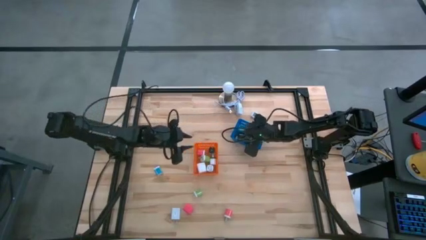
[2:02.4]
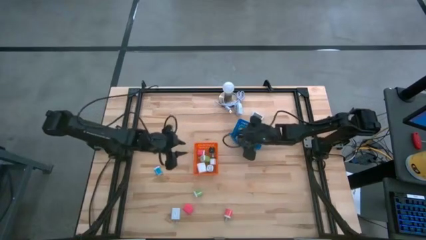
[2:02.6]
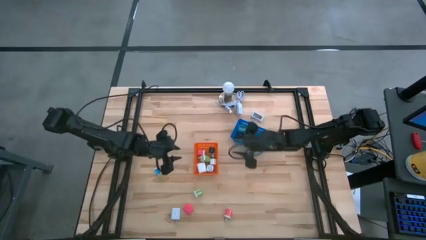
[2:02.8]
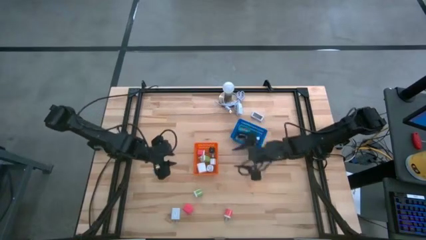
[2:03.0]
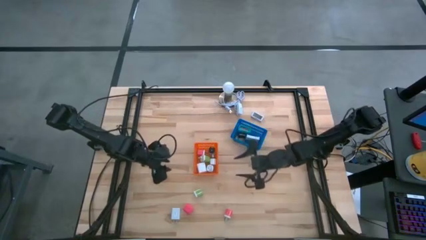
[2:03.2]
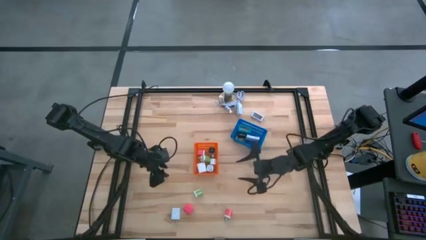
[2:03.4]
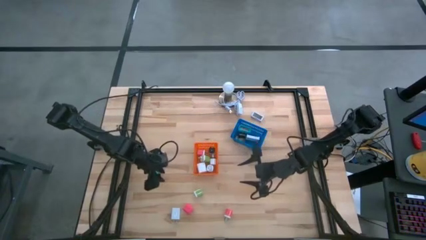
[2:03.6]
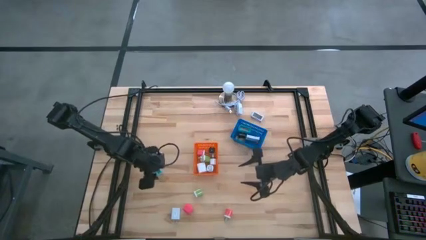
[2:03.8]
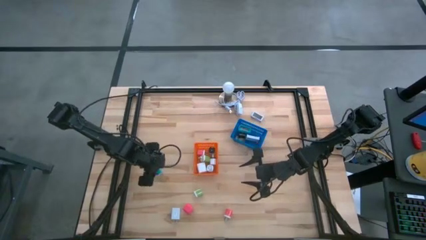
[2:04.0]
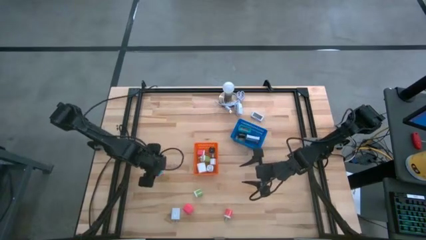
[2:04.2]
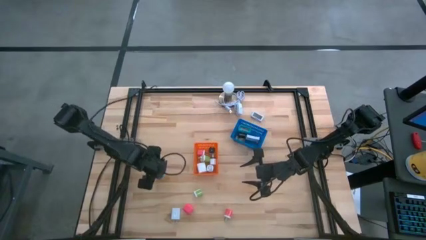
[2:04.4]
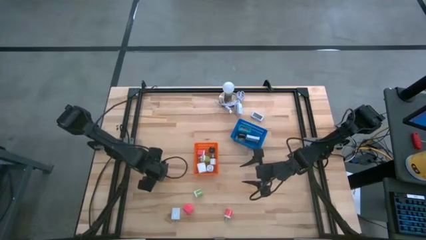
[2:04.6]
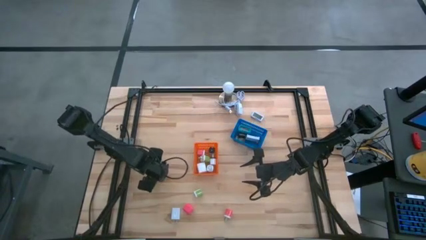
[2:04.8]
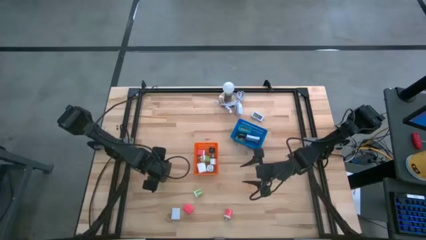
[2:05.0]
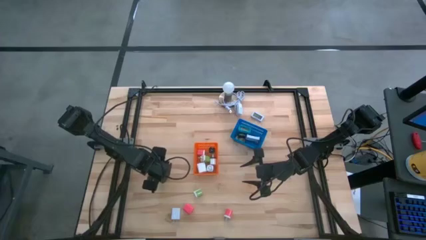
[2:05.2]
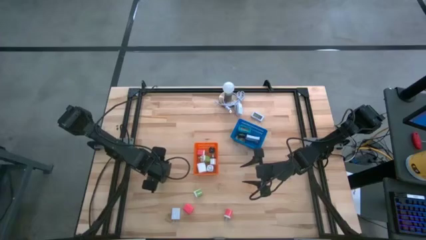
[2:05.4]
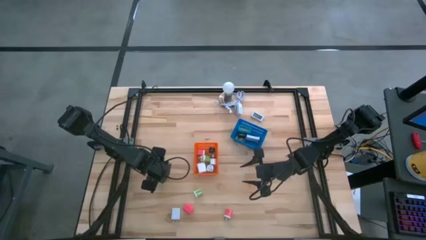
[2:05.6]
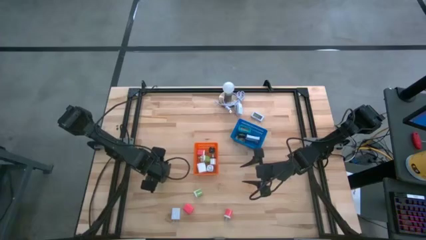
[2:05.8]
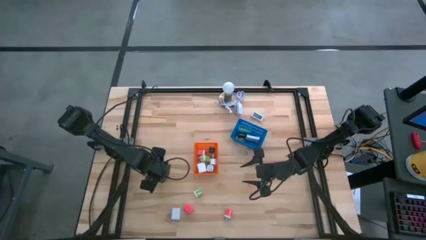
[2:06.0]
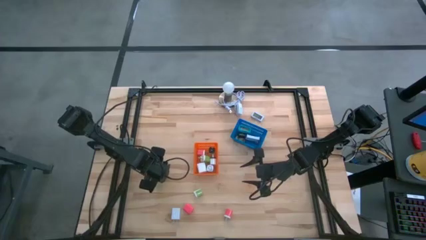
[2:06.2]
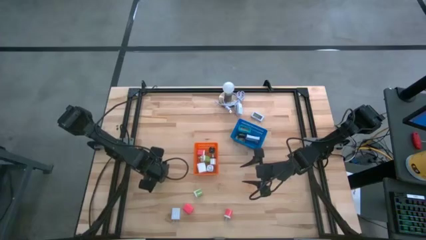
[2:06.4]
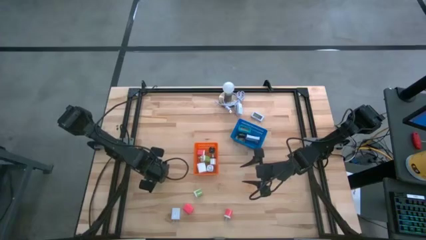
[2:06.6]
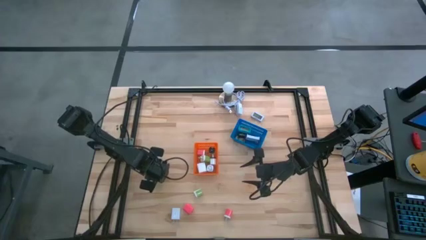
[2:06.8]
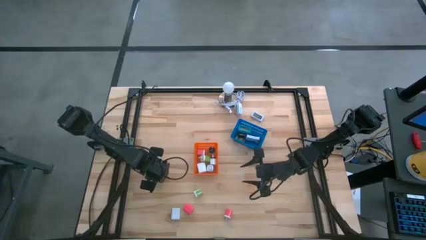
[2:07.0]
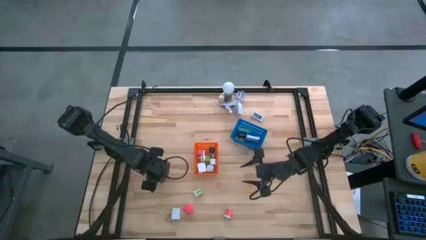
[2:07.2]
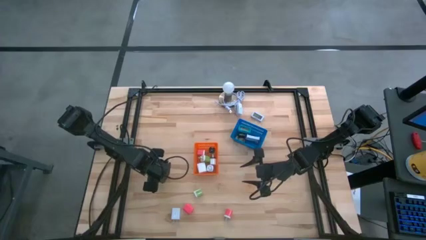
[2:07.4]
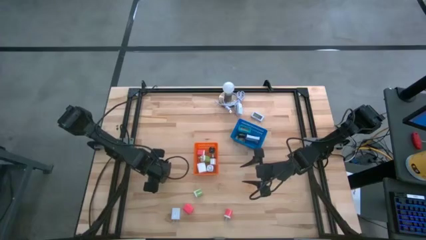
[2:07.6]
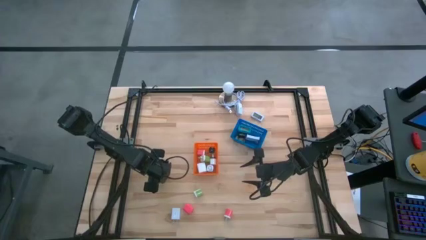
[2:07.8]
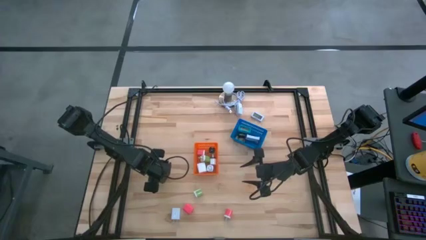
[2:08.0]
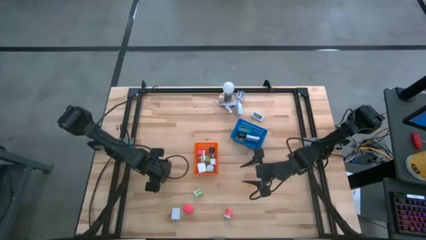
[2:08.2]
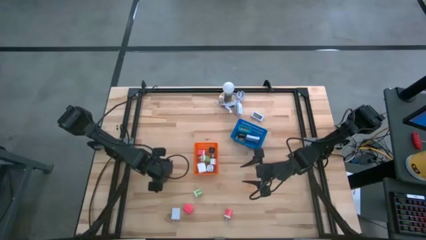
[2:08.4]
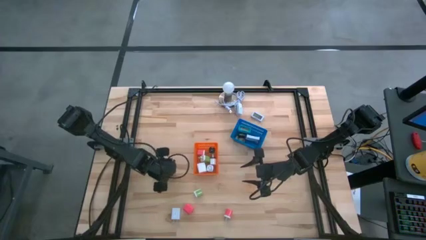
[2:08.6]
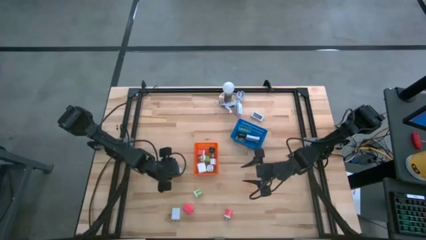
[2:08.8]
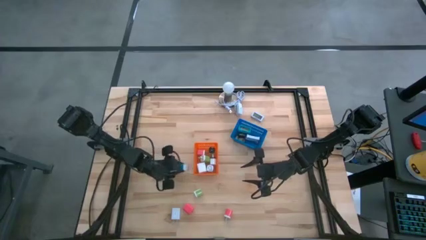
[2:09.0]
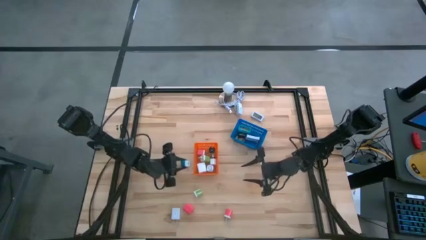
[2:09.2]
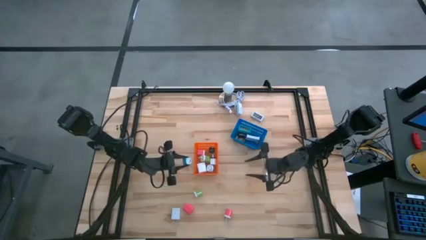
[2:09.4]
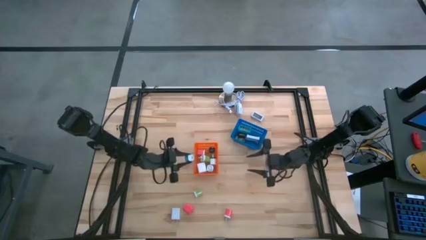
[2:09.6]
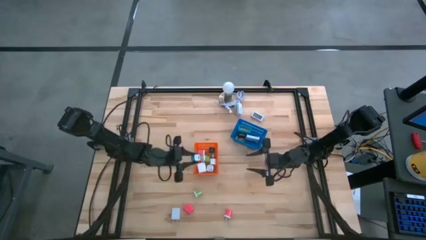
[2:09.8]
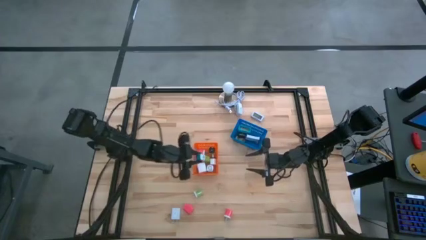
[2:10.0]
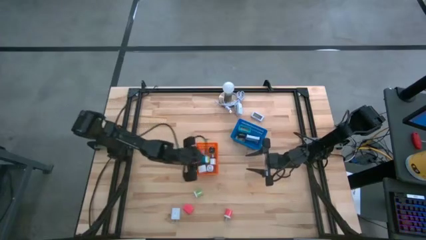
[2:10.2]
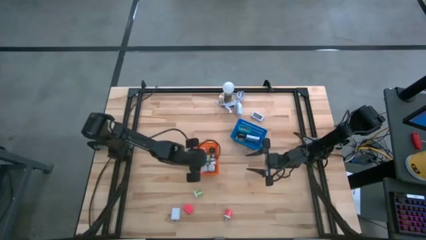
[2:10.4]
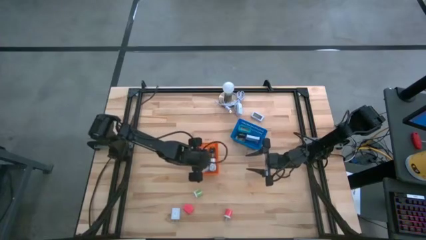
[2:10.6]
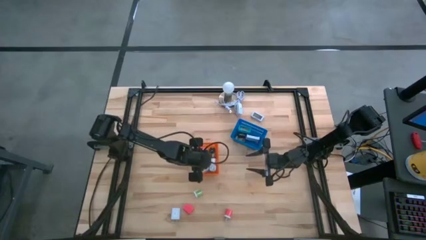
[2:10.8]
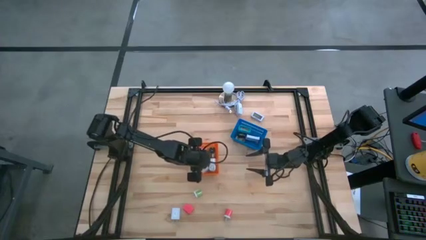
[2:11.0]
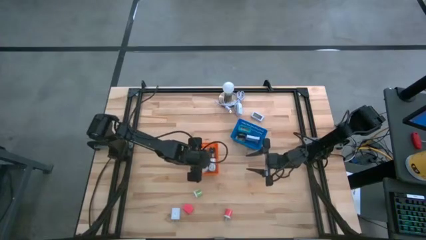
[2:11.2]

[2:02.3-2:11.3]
Task: Pick & Place Office items
Put the sky blue charger adapter into the orange bin

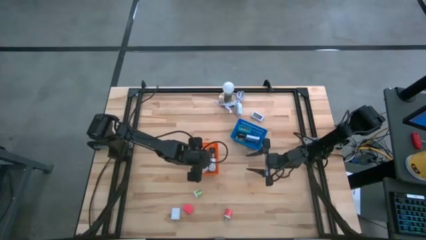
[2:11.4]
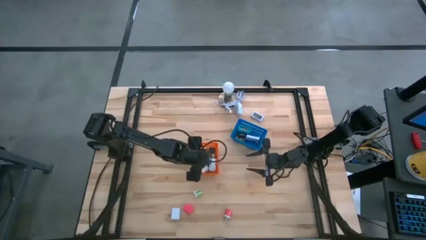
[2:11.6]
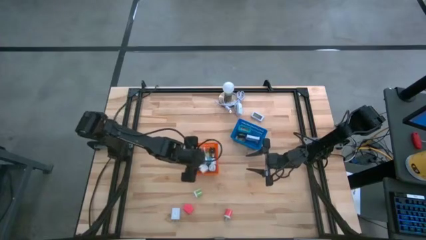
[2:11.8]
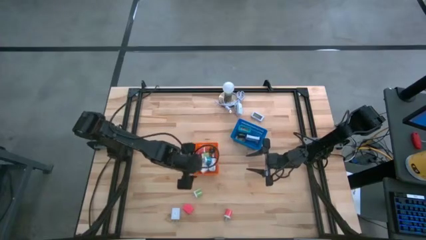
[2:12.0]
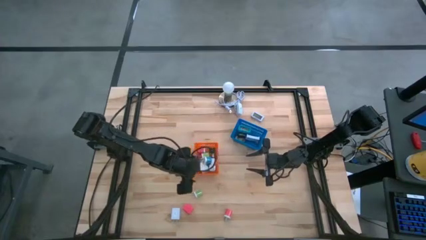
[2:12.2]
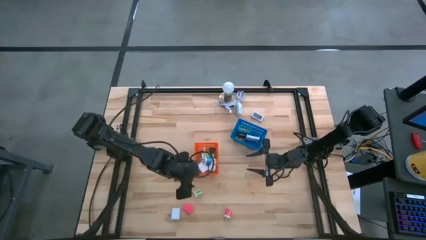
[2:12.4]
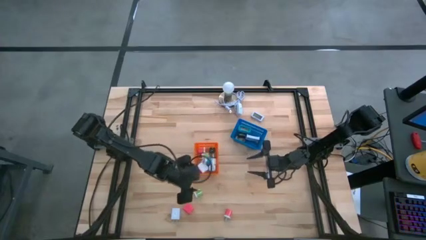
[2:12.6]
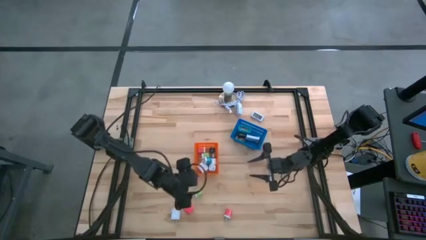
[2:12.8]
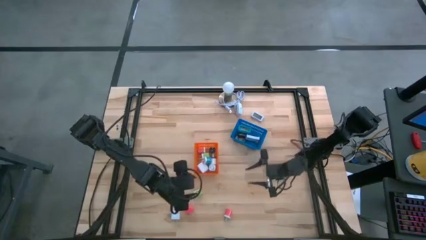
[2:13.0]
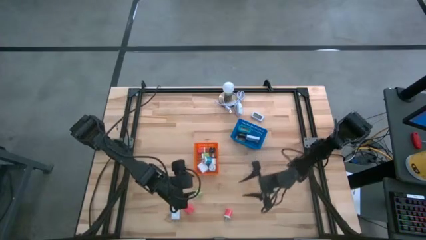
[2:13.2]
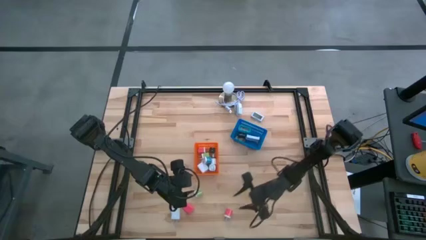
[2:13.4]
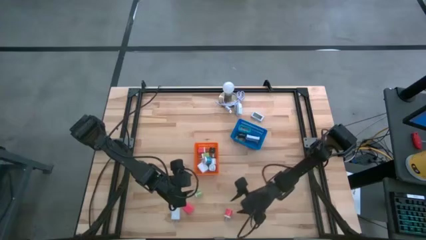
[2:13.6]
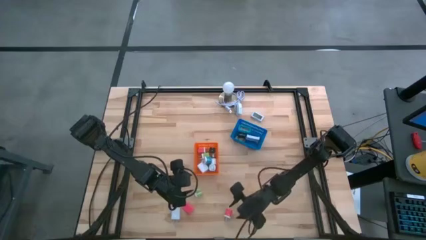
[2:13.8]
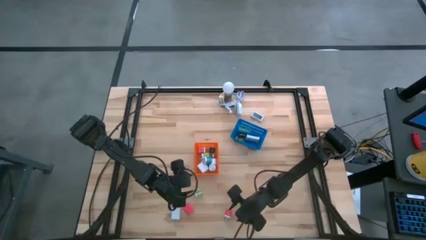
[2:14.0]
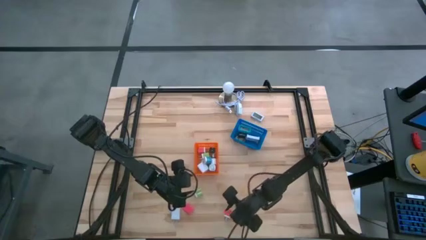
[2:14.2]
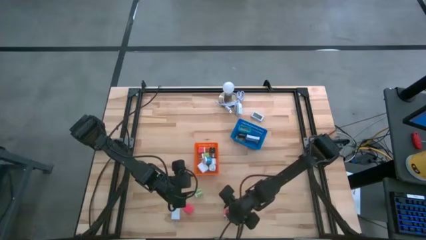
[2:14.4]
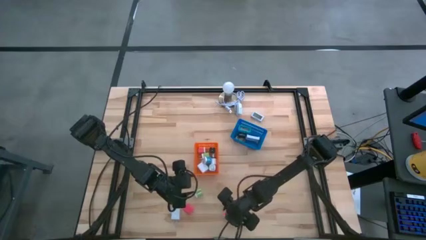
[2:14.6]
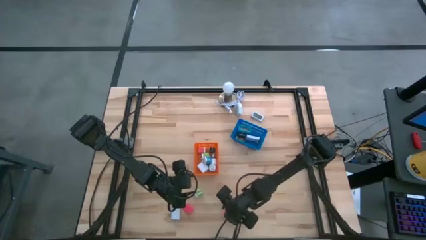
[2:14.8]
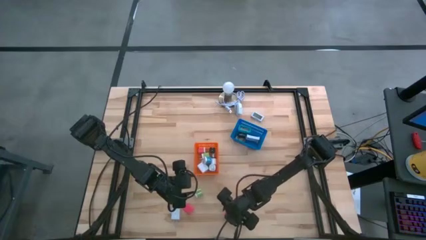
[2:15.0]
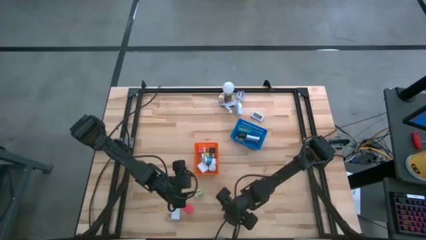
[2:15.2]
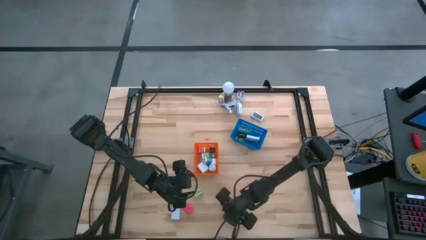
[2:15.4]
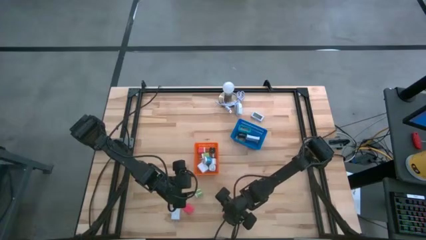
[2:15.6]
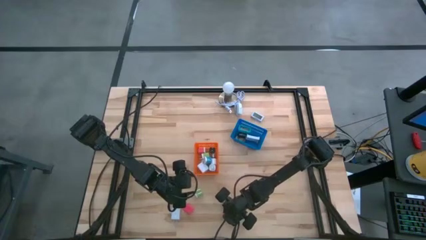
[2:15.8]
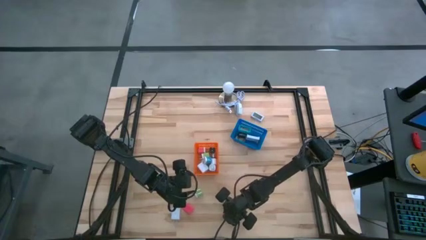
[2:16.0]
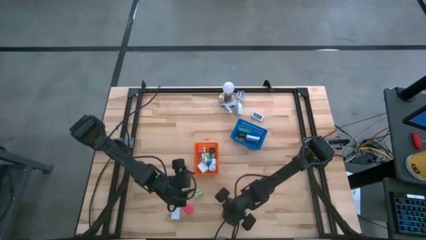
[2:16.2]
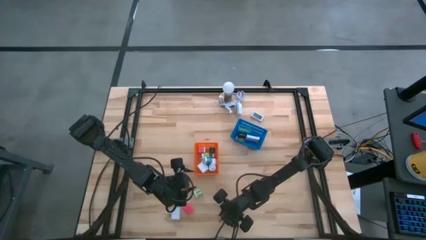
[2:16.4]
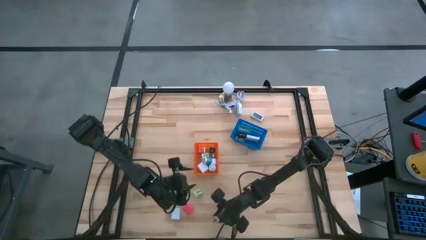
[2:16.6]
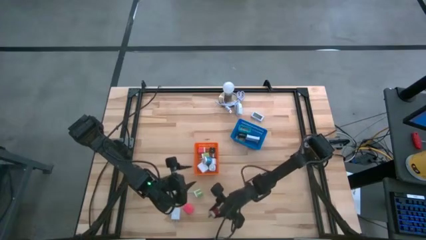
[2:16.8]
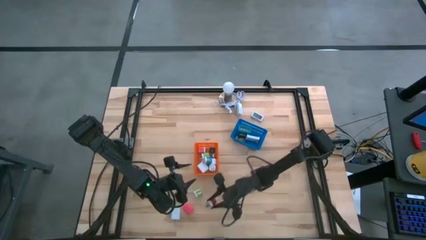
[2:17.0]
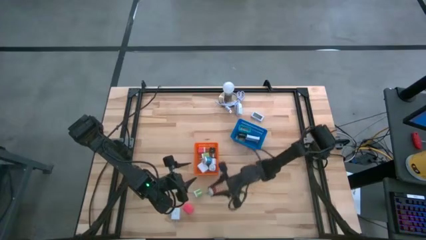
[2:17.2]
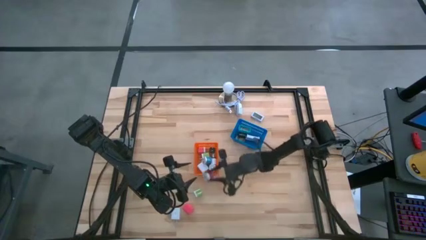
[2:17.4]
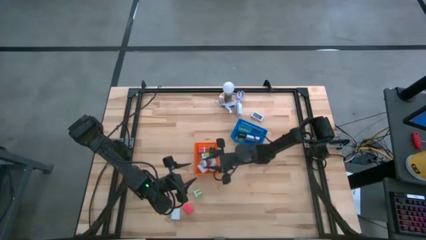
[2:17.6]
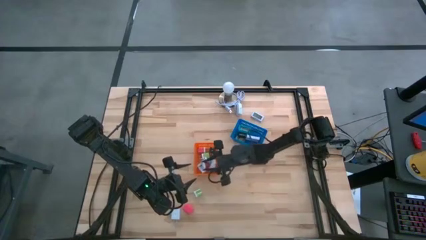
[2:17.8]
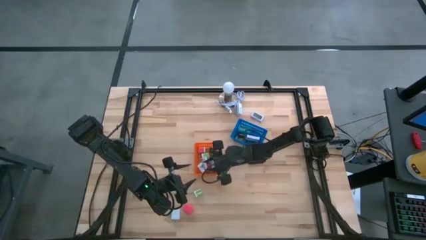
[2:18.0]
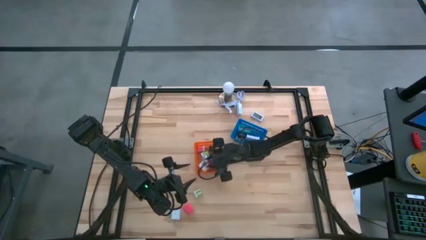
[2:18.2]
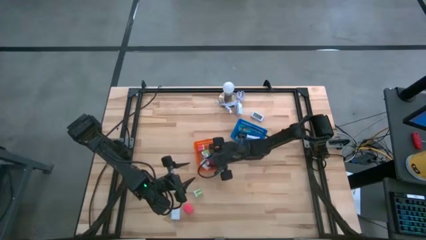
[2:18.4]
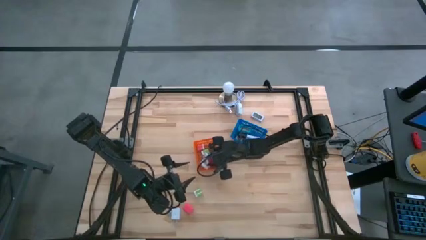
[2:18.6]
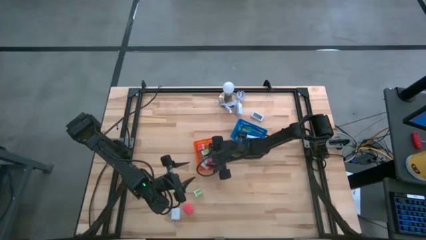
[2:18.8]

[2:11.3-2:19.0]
Put the pink white charger adapter into the orange bin
